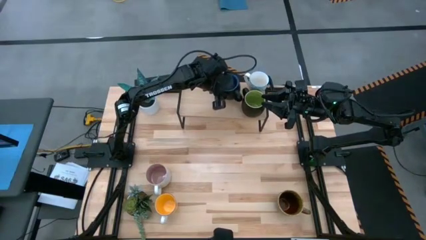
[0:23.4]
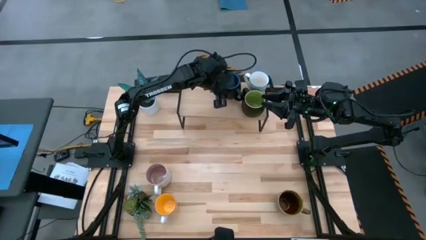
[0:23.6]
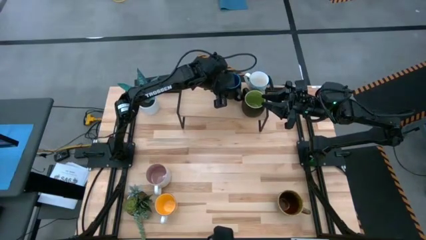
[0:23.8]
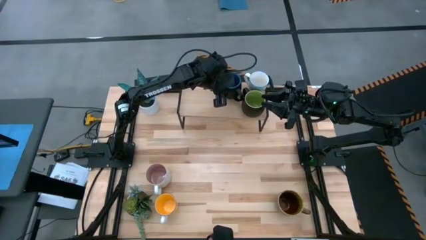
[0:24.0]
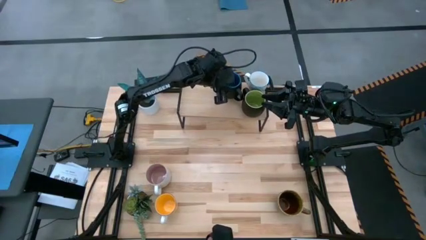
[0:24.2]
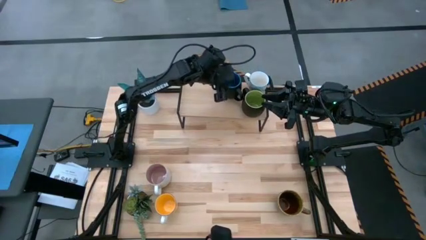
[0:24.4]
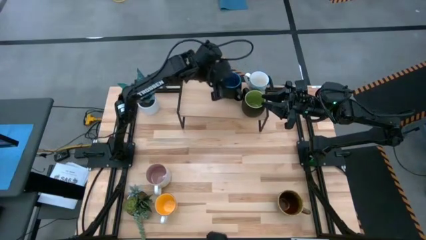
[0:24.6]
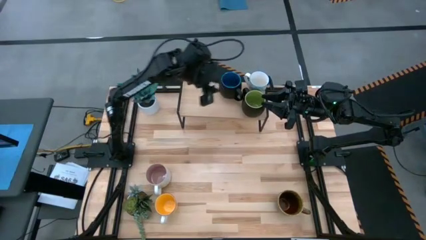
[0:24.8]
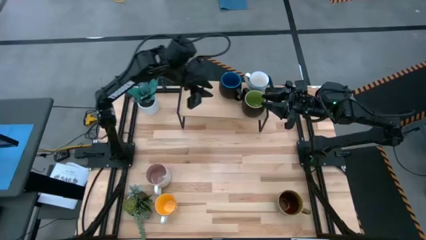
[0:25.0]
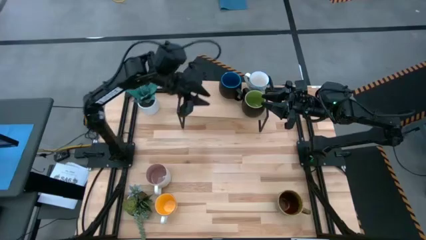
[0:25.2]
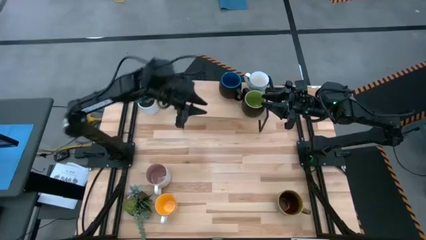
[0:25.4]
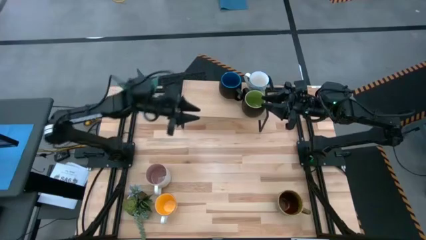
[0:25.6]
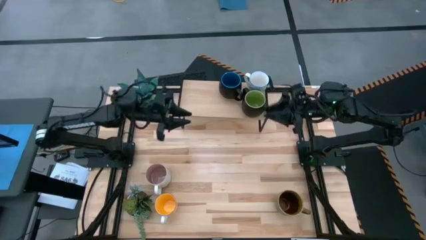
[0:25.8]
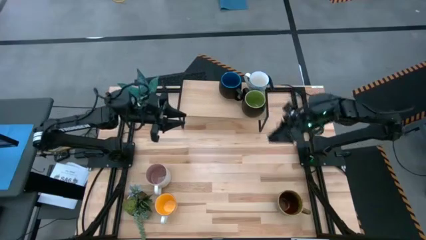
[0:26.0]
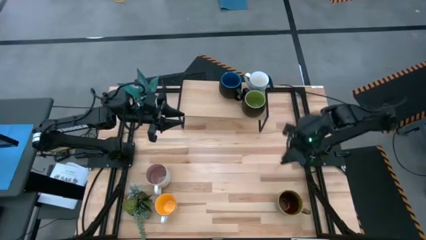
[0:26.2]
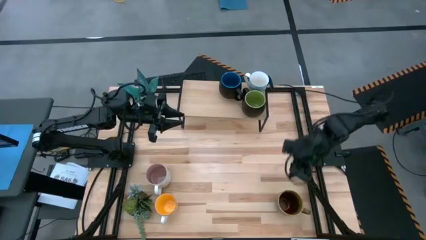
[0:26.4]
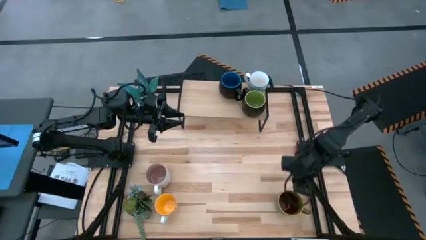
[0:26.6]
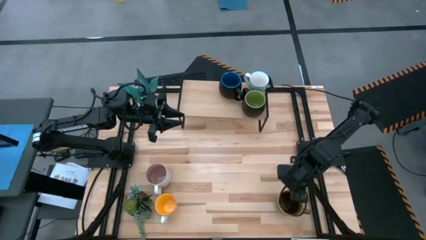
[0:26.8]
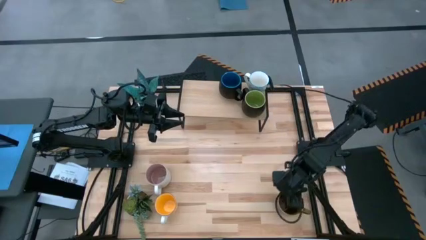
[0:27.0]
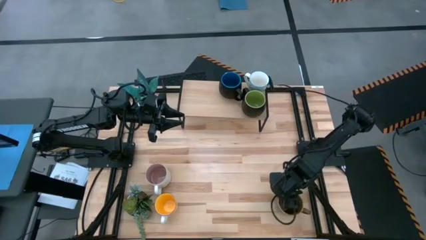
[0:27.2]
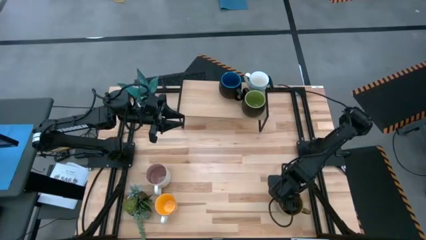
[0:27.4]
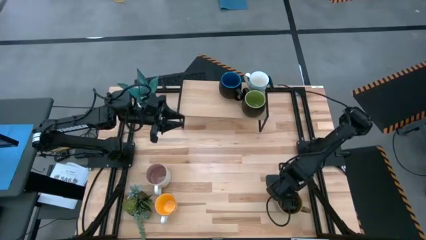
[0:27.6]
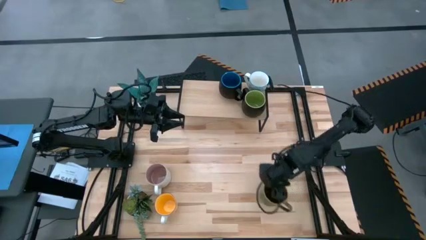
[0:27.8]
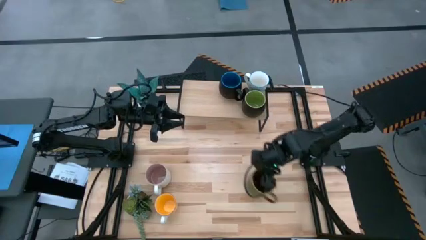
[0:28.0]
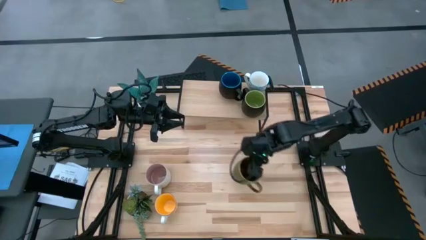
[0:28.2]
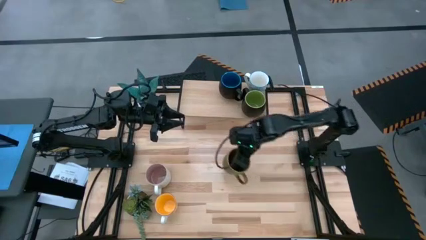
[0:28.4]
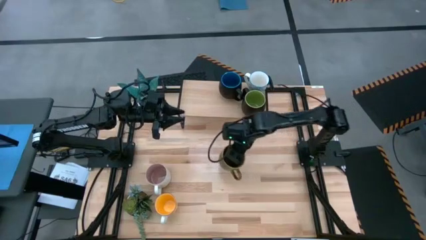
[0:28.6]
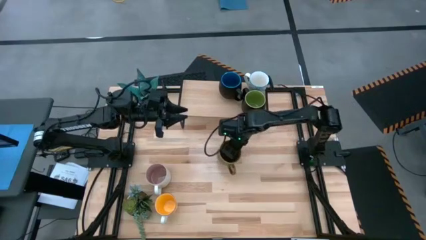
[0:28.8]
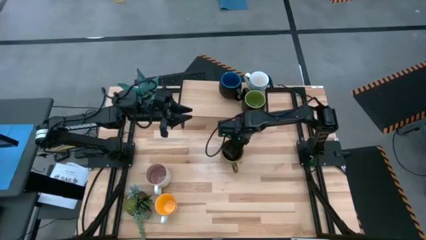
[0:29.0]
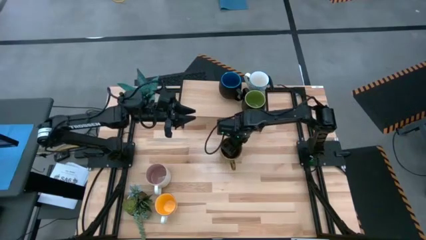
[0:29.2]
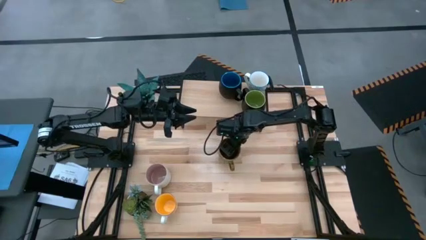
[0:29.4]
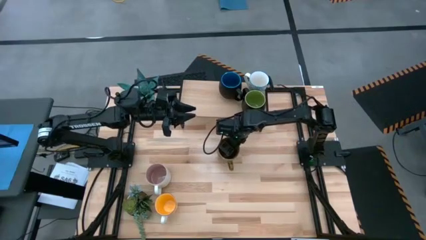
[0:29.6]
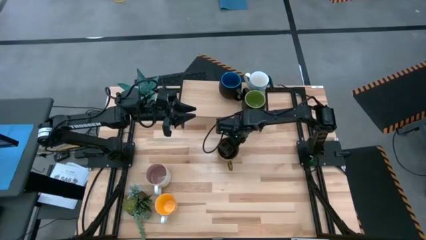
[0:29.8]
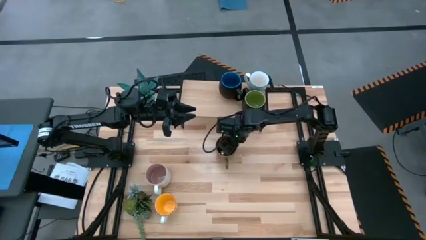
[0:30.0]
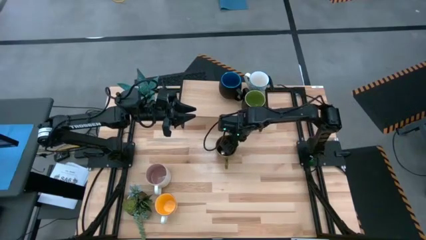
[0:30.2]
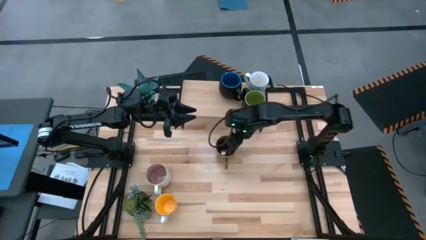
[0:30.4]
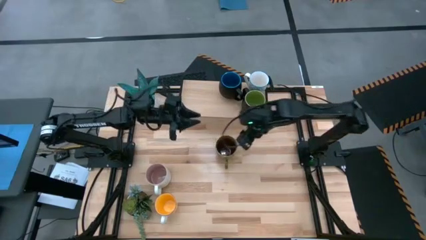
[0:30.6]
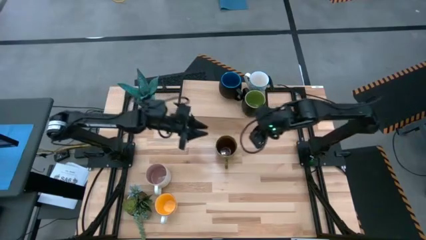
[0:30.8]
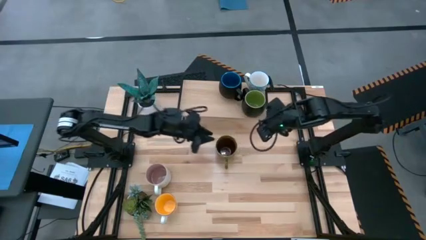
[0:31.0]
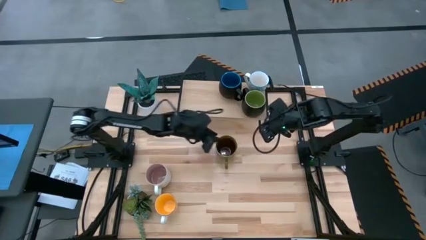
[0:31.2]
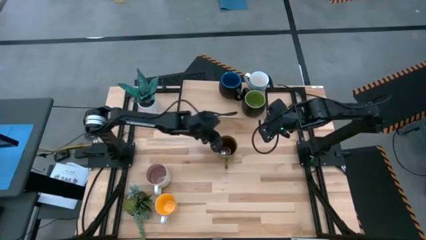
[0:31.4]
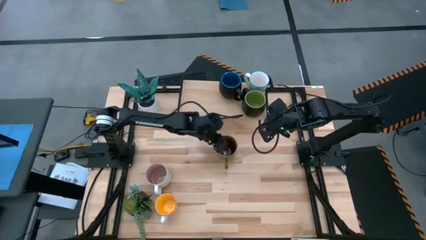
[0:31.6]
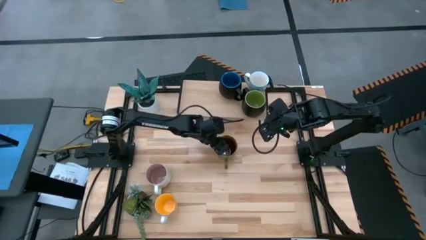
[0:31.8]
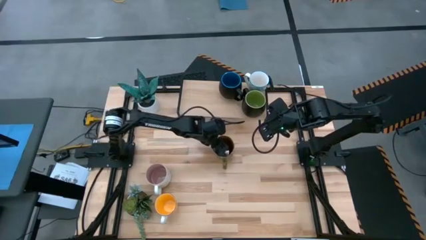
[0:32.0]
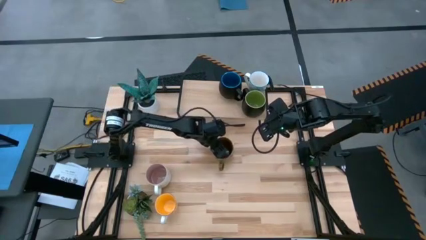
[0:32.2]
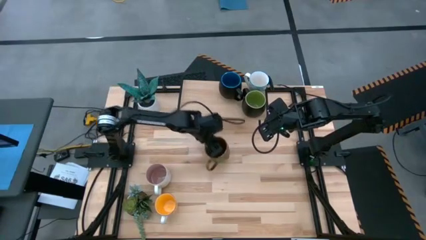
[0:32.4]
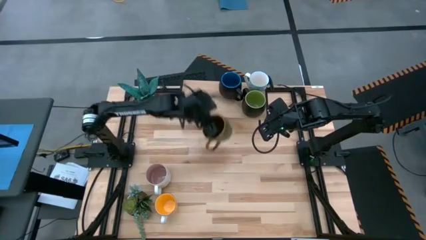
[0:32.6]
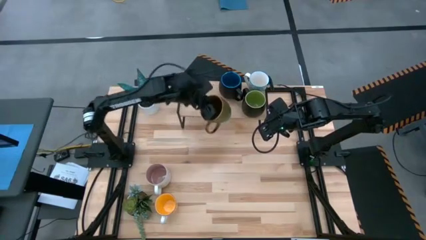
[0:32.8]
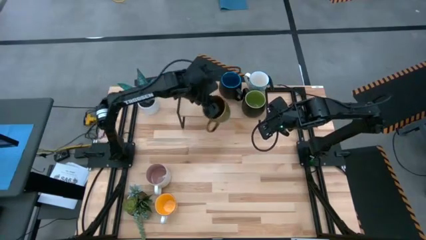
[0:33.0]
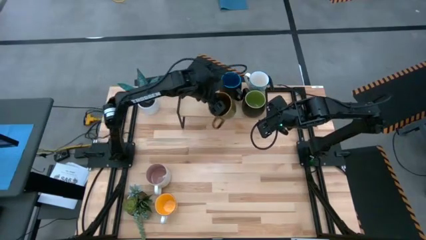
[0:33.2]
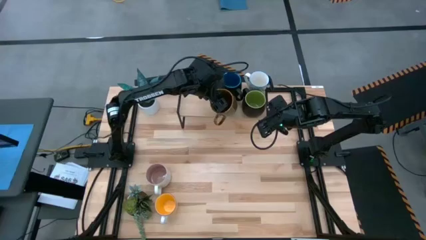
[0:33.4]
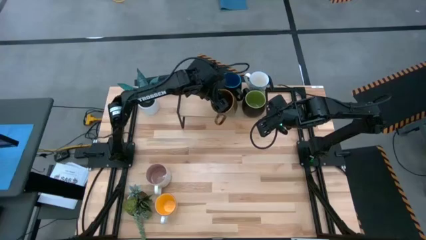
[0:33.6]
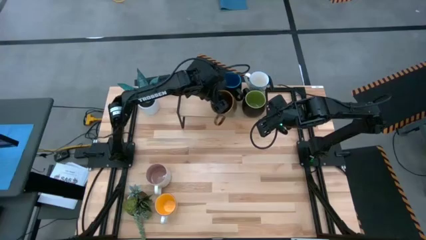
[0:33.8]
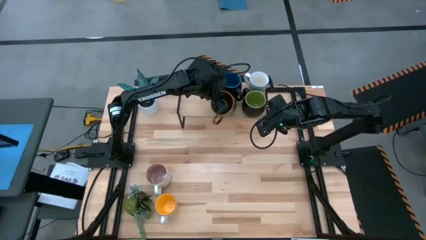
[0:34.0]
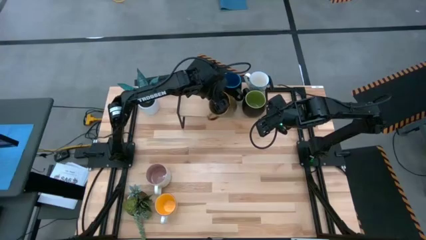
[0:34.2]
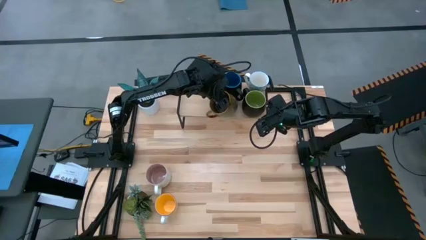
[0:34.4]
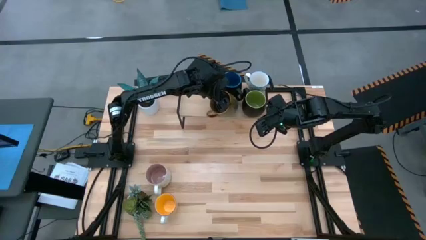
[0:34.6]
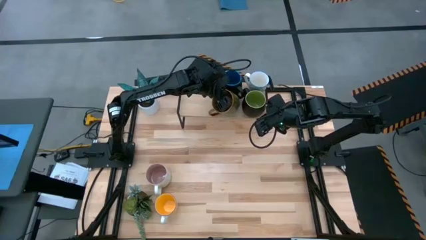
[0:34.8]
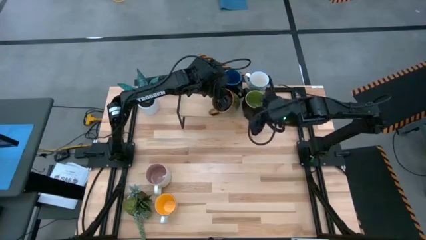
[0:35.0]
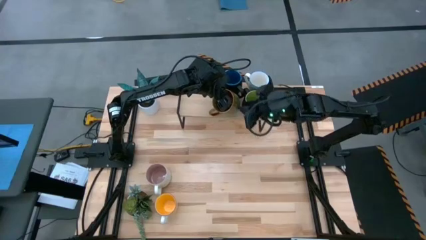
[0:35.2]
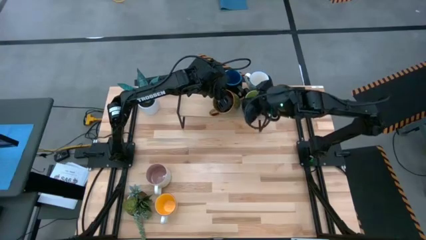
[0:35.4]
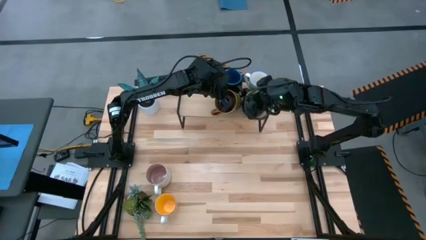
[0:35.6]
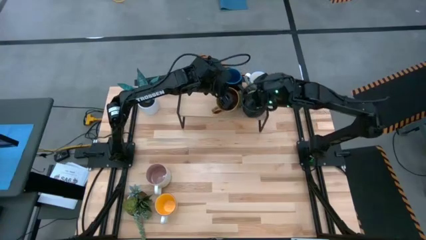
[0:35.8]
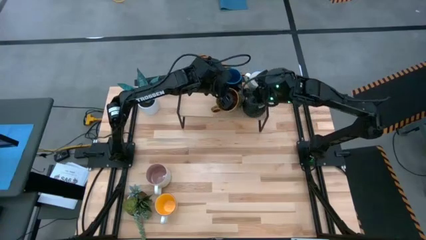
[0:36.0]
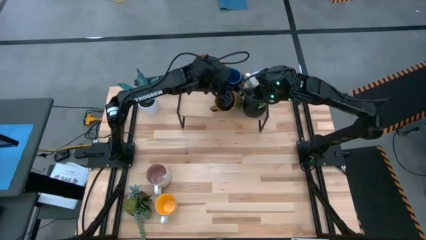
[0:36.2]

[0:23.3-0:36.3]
Task: Place coffee mugs
Put the green-blue mug interior on the shelf

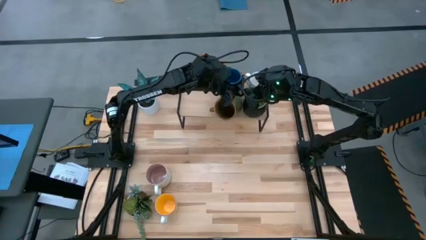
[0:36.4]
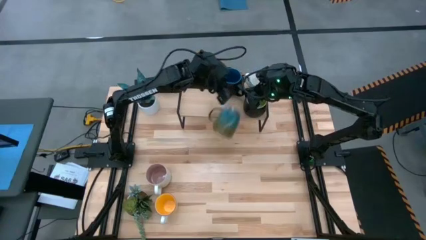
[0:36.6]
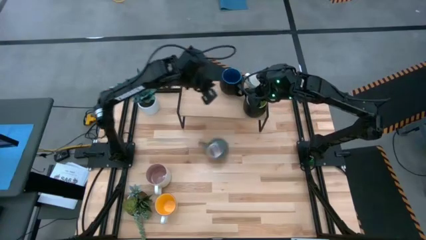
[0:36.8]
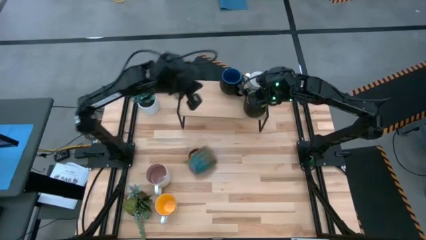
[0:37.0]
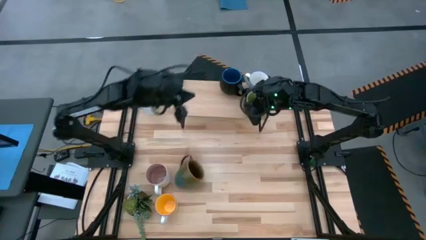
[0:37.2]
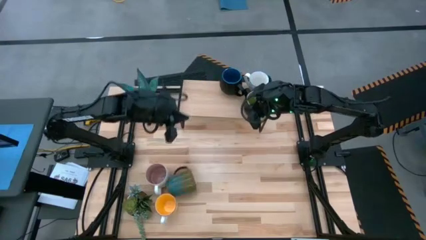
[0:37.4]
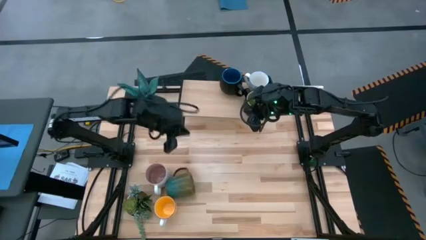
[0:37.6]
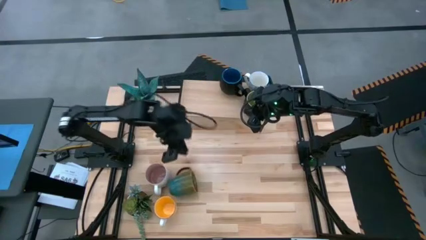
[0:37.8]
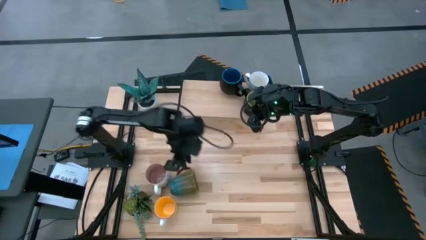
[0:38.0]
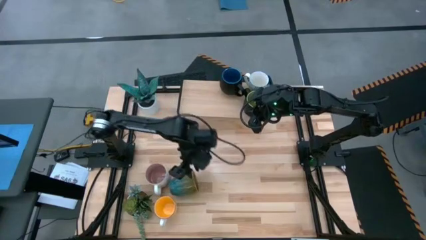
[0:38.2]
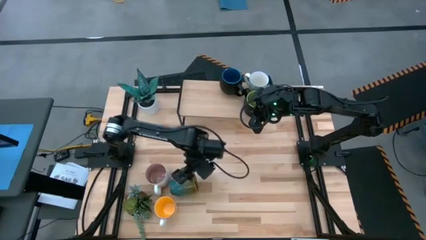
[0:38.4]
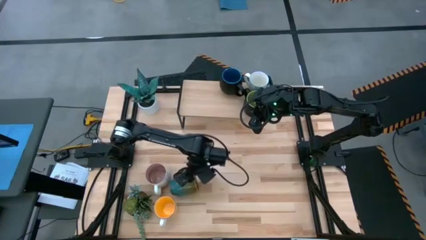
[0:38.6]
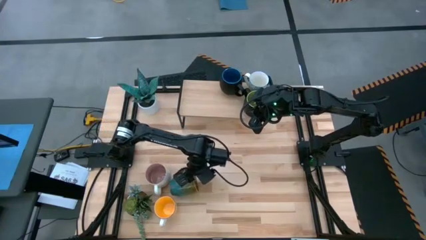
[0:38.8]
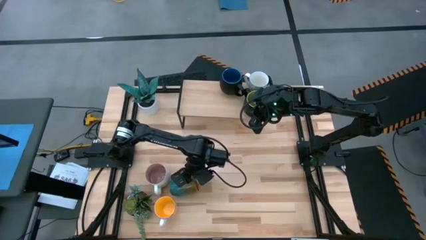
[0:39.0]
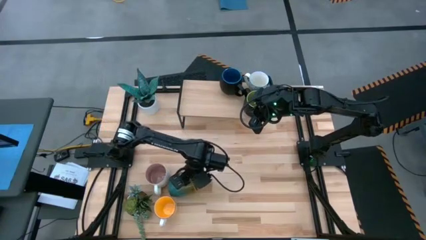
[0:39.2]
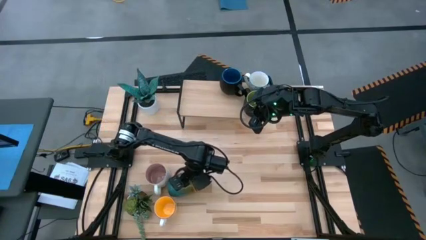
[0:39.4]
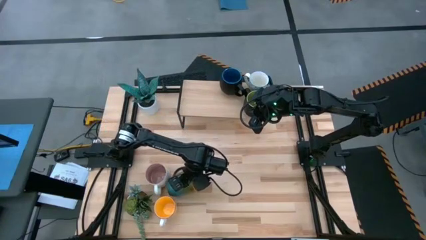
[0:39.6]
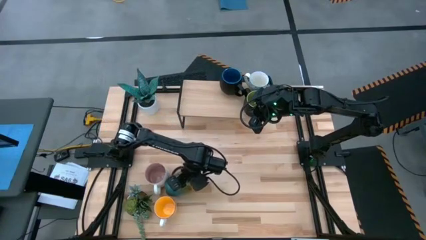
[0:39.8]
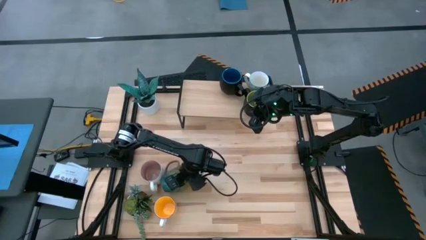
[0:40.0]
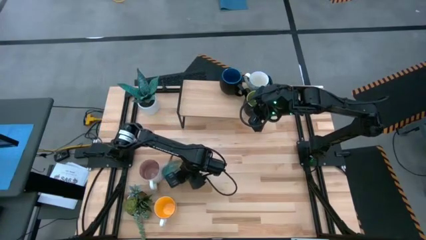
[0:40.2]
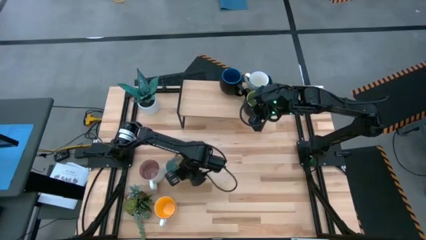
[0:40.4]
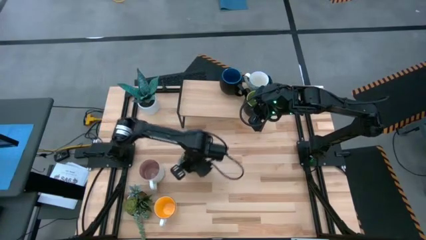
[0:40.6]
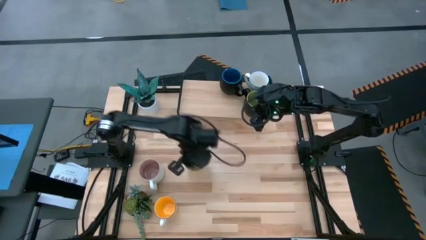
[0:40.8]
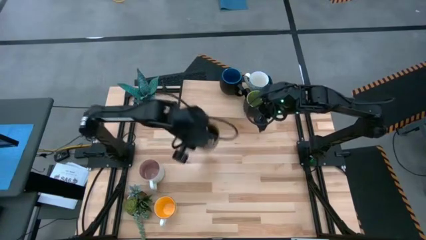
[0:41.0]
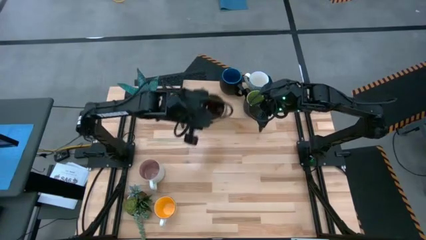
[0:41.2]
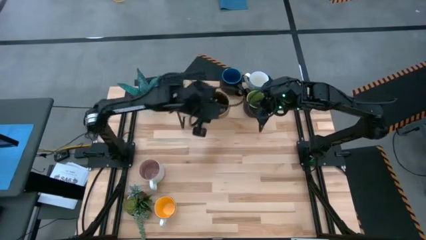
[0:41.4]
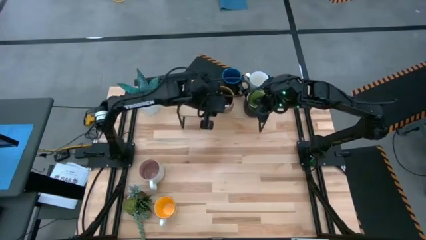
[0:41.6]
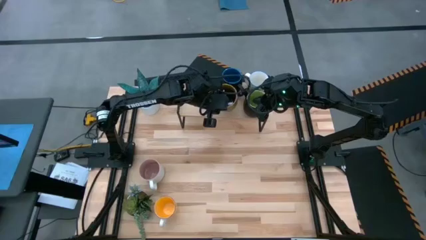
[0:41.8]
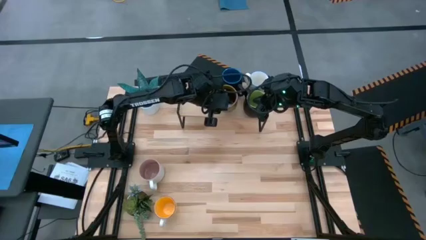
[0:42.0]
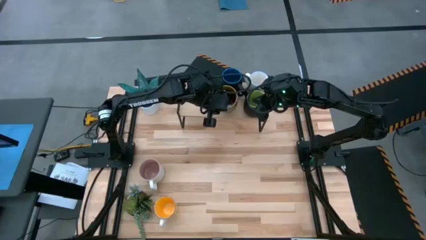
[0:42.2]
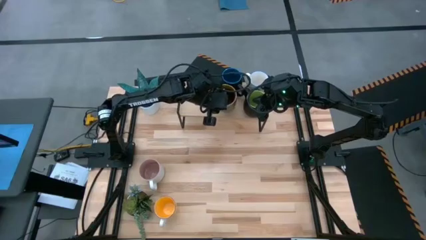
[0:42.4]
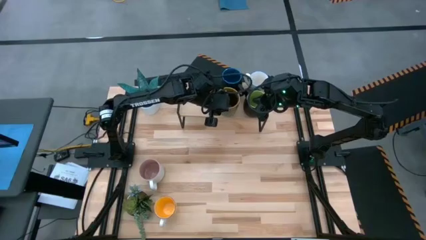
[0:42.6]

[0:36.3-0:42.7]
Put the green-blue mug interior on the shelf
